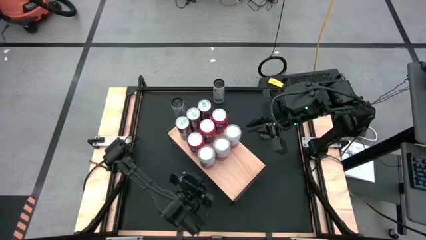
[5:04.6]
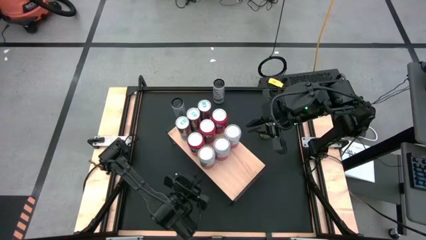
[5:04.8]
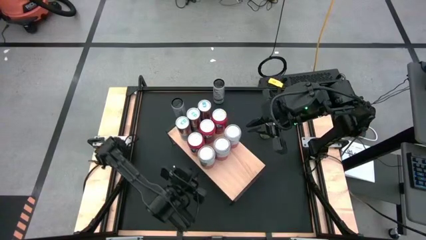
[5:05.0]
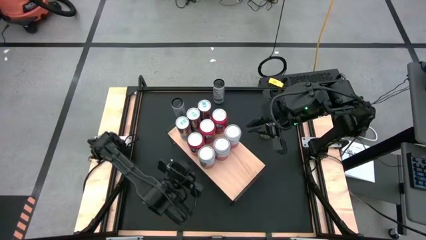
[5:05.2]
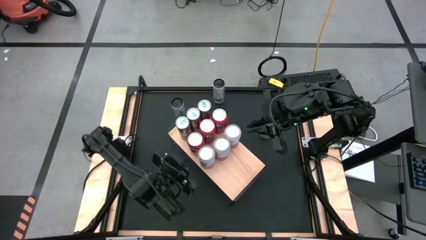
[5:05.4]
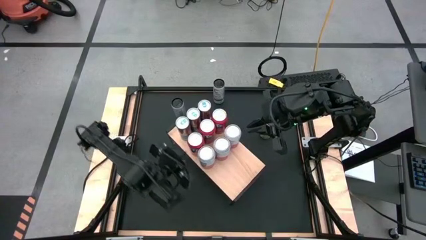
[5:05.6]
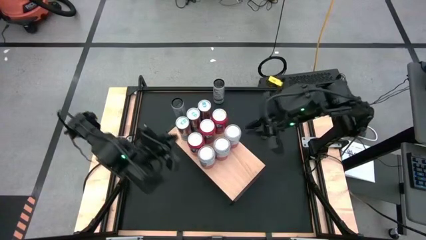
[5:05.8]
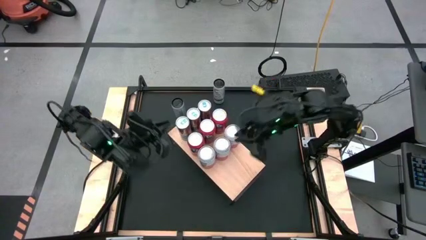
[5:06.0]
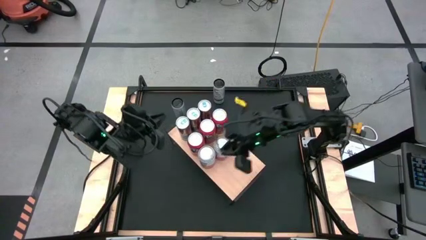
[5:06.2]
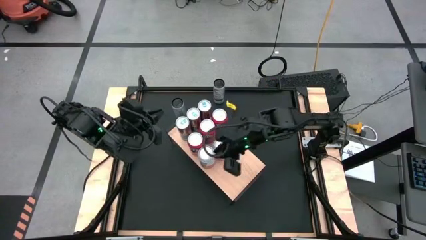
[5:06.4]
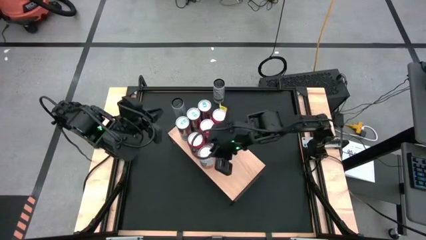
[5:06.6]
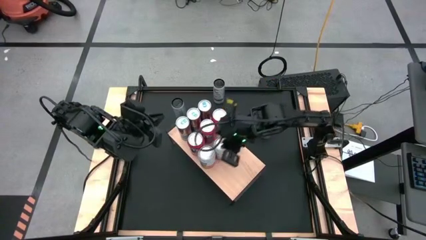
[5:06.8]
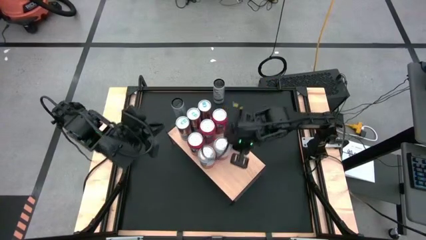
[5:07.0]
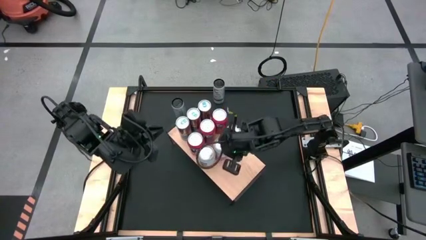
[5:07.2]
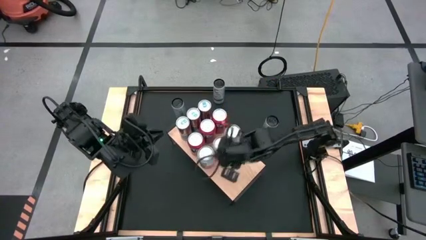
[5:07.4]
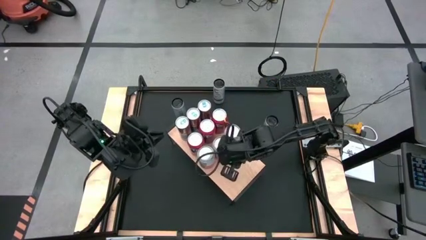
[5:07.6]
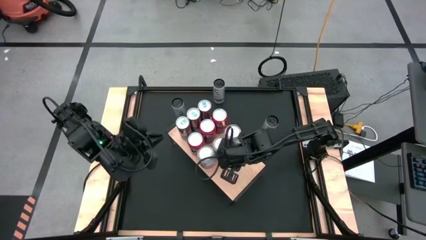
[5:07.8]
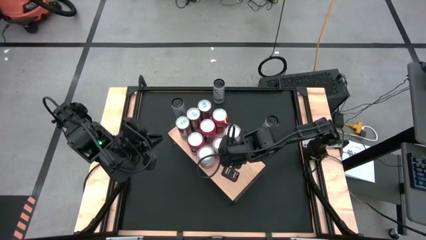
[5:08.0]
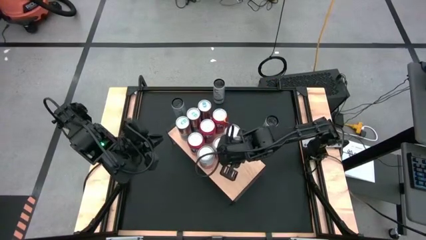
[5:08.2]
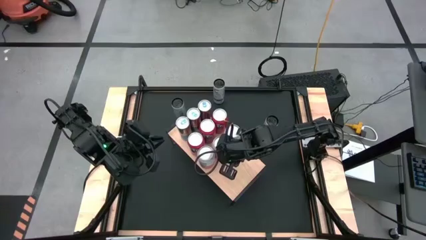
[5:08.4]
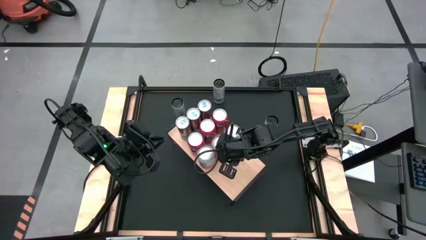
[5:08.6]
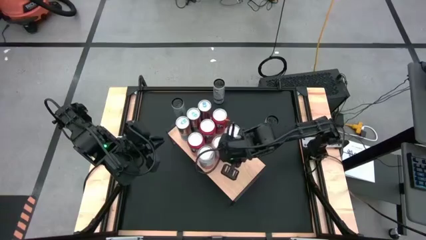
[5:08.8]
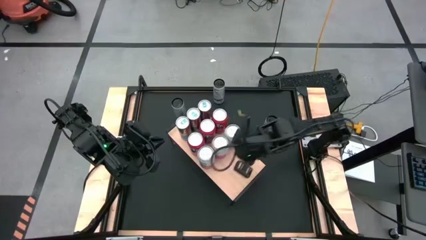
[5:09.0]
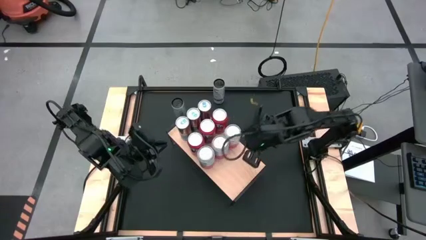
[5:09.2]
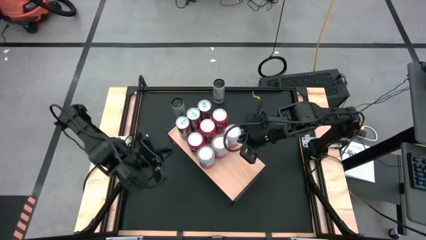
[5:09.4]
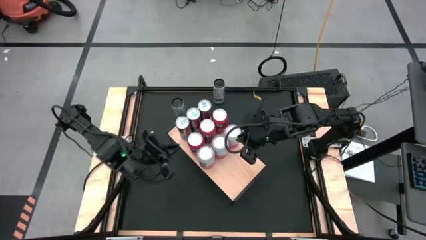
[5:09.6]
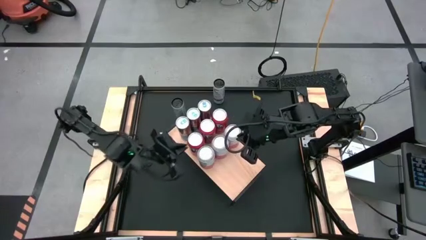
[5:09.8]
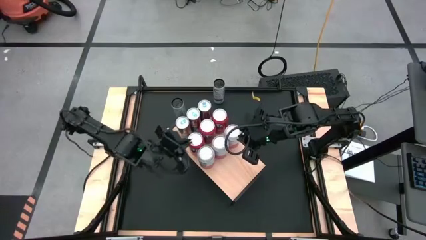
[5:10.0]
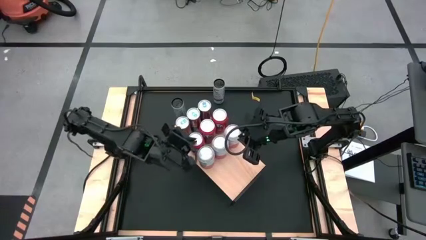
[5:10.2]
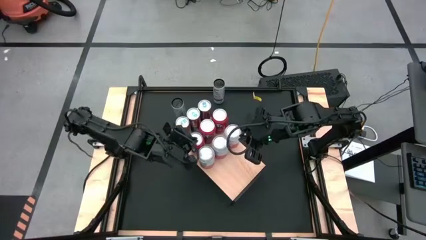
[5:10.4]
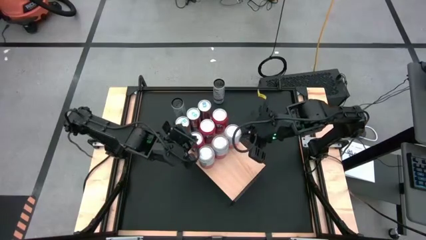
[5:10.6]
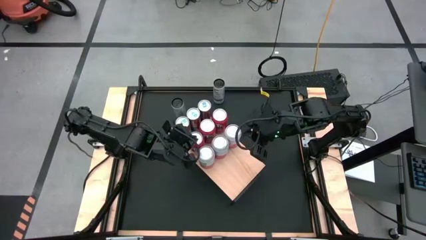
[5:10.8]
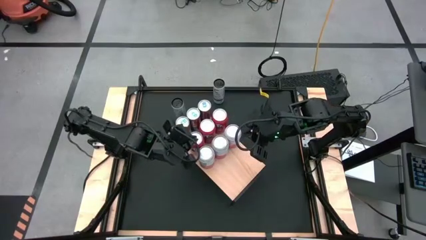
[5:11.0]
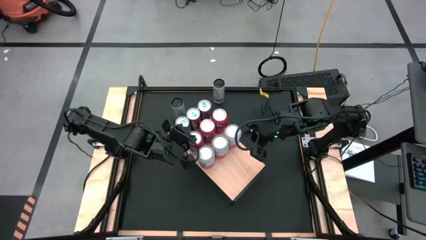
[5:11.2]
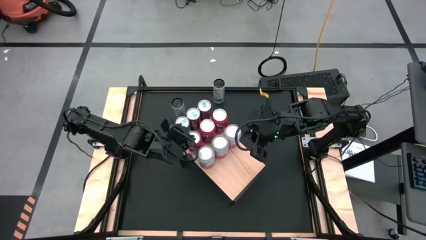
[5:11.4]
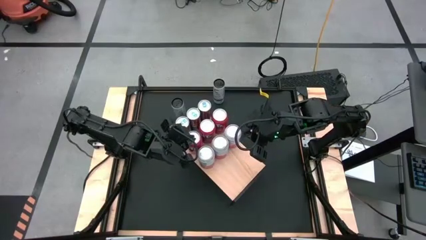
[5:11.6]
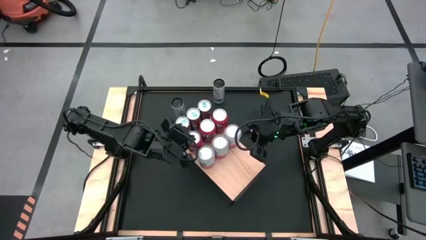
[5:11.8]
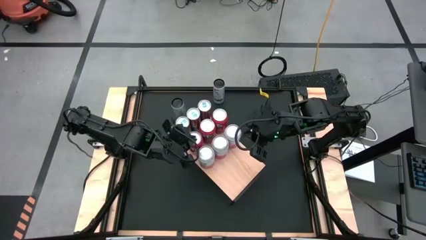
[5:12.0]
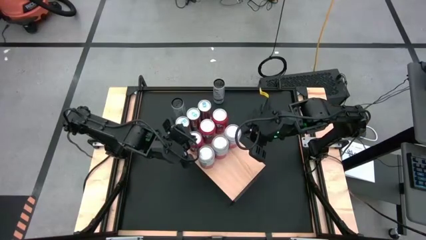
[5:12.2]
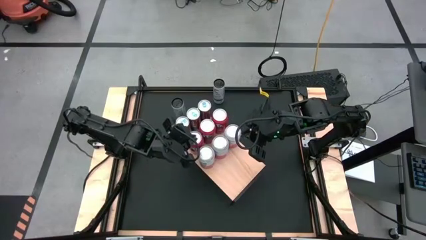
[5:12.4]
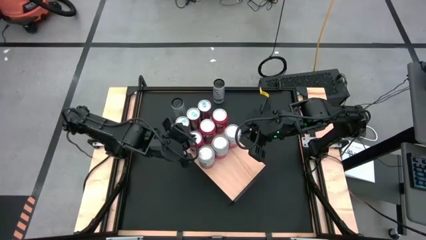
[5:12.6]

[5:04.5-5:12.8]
Task: Place canned beverage on shelf
Adjust the soda cans on the shelf

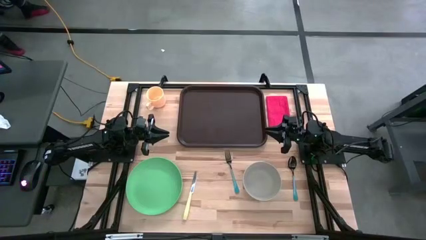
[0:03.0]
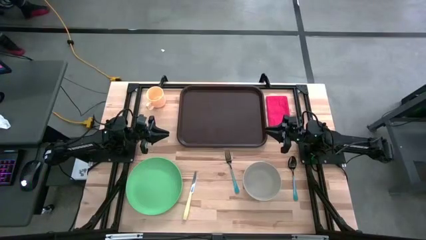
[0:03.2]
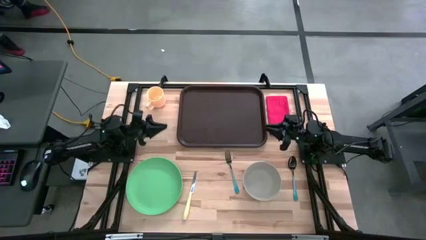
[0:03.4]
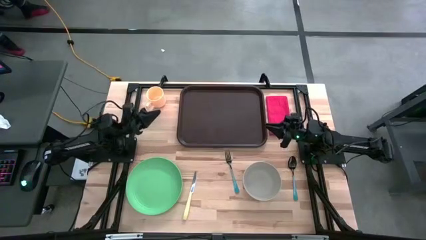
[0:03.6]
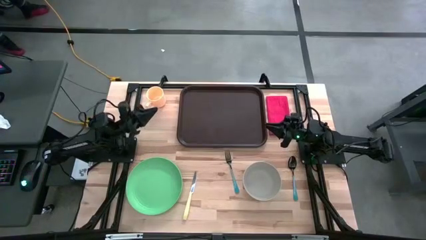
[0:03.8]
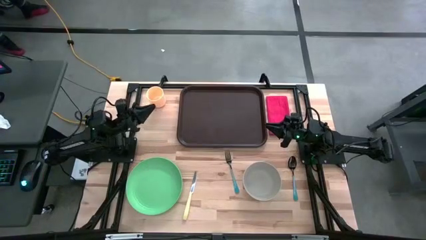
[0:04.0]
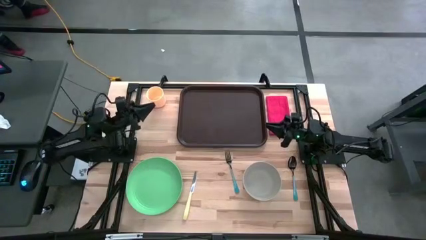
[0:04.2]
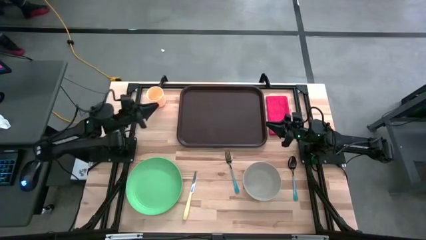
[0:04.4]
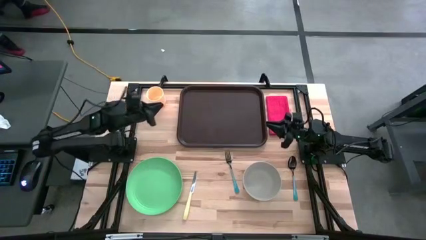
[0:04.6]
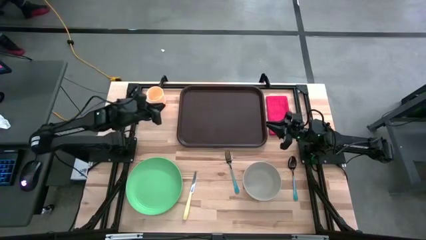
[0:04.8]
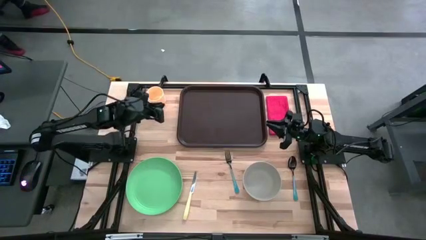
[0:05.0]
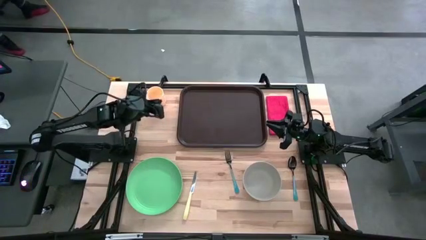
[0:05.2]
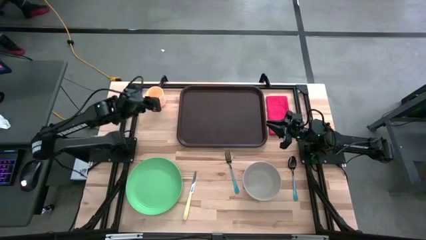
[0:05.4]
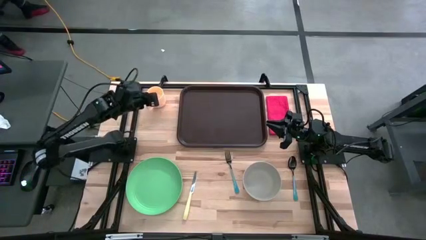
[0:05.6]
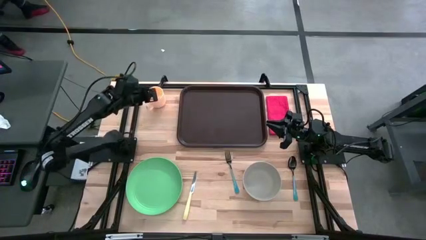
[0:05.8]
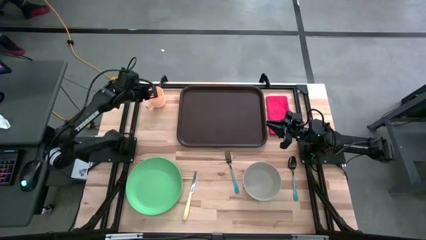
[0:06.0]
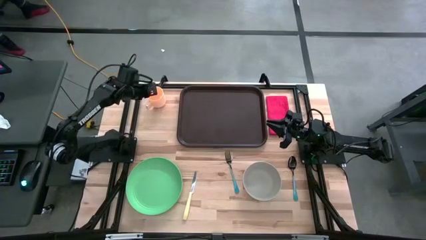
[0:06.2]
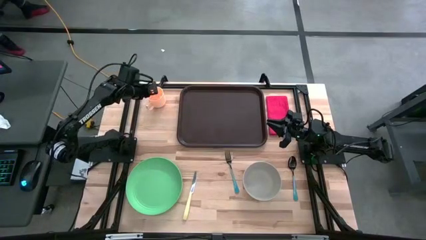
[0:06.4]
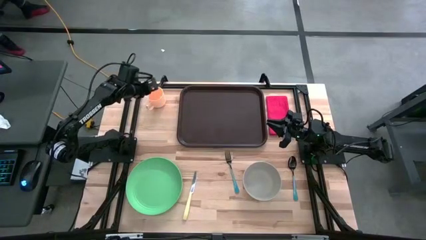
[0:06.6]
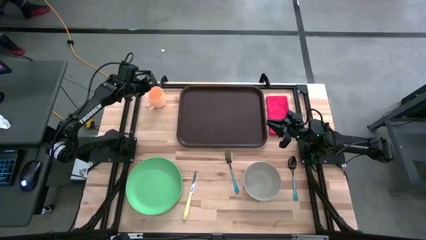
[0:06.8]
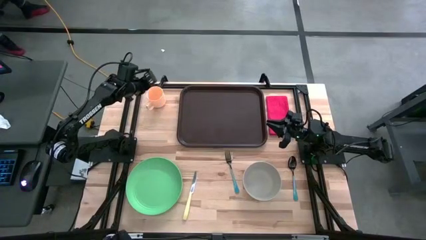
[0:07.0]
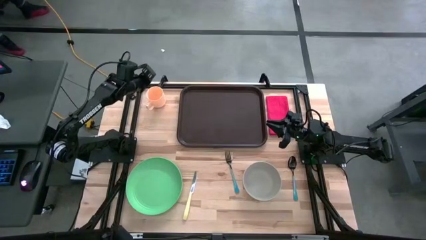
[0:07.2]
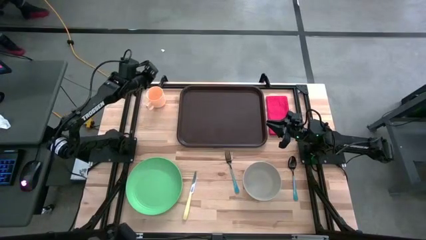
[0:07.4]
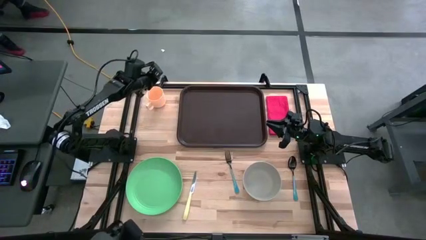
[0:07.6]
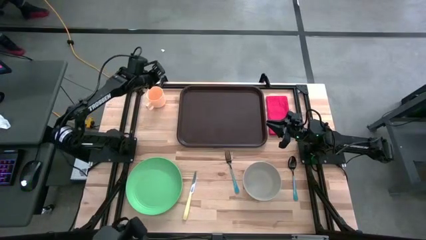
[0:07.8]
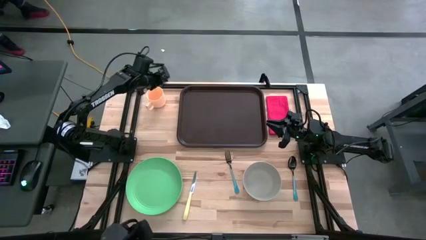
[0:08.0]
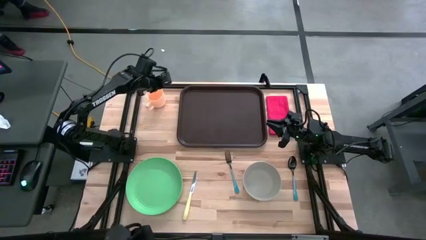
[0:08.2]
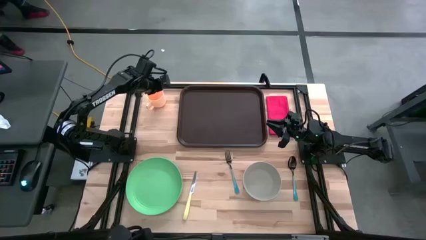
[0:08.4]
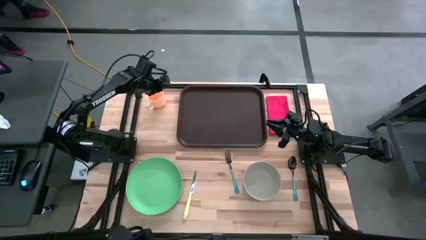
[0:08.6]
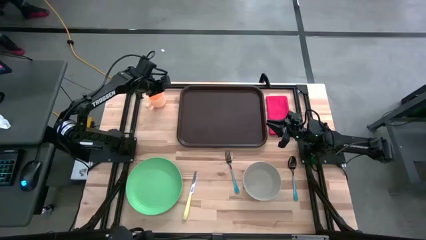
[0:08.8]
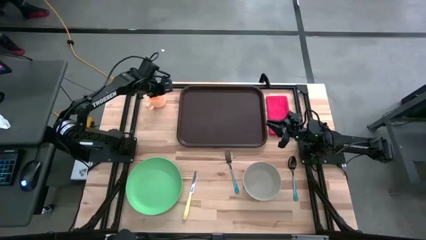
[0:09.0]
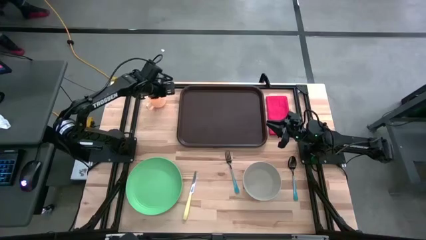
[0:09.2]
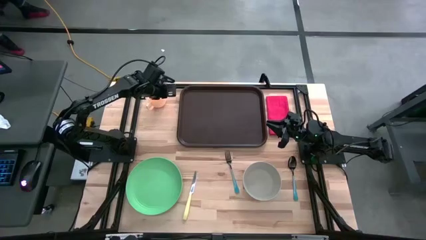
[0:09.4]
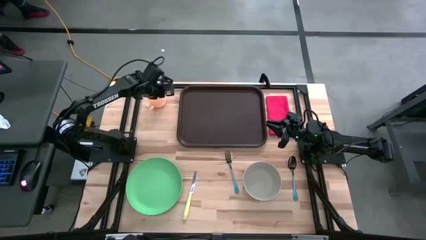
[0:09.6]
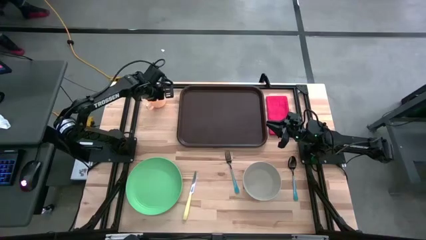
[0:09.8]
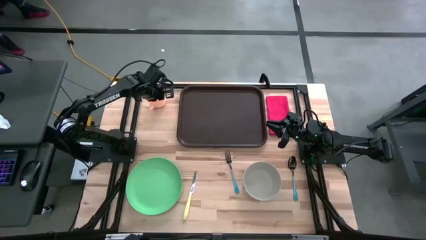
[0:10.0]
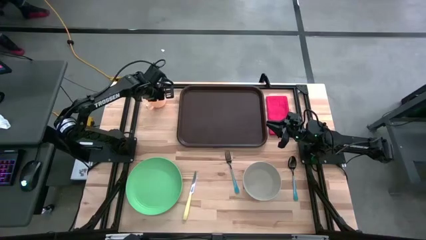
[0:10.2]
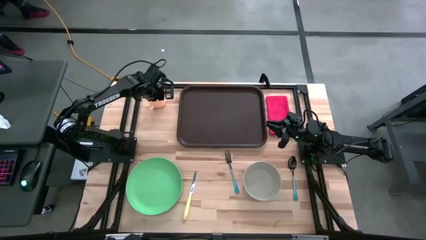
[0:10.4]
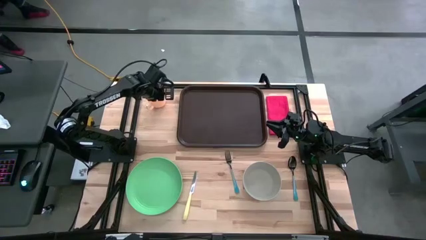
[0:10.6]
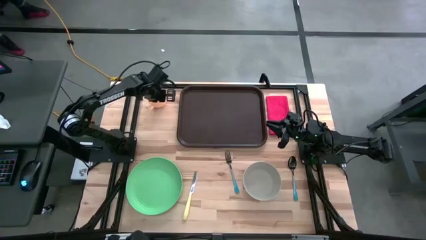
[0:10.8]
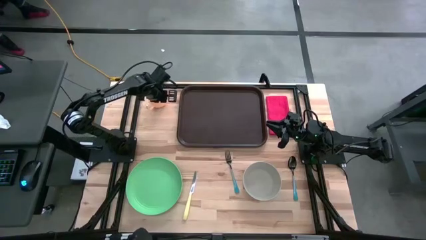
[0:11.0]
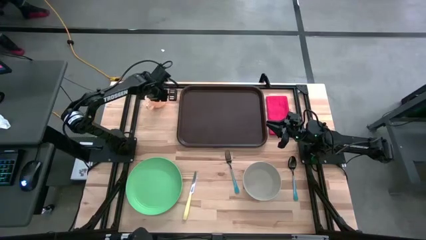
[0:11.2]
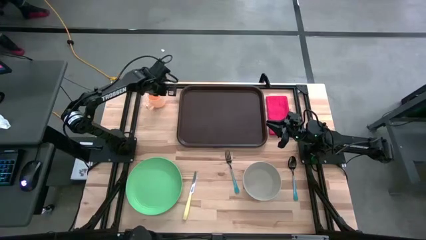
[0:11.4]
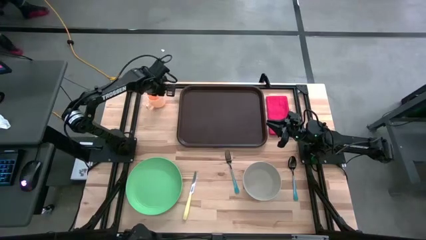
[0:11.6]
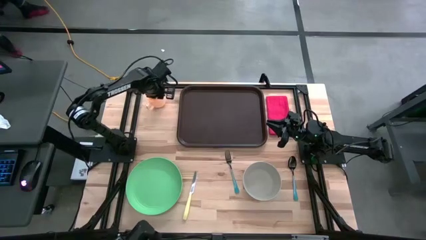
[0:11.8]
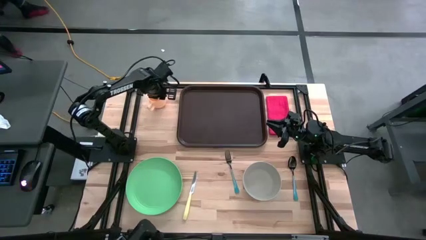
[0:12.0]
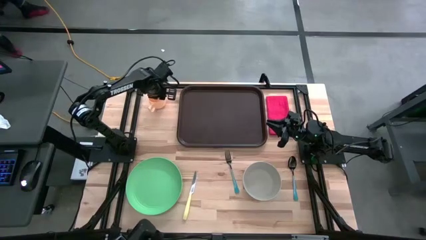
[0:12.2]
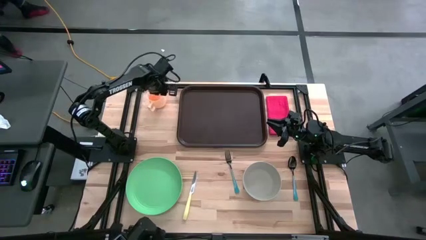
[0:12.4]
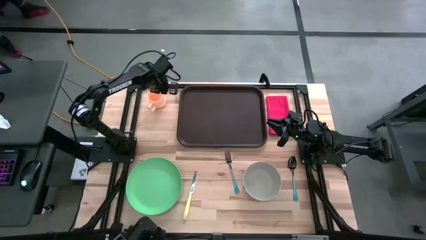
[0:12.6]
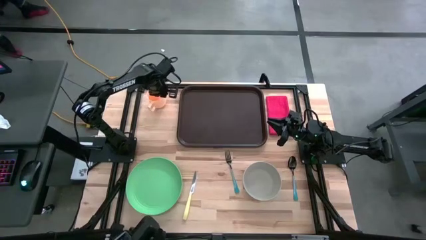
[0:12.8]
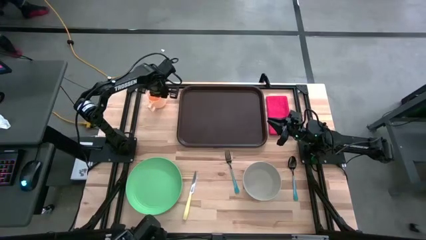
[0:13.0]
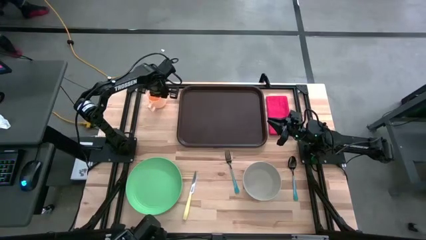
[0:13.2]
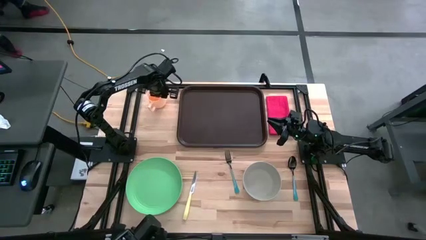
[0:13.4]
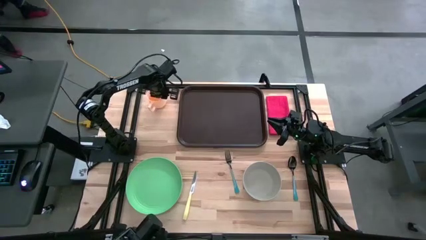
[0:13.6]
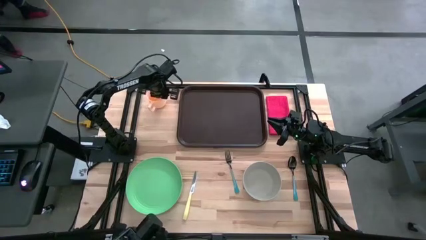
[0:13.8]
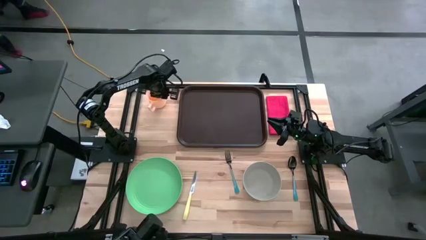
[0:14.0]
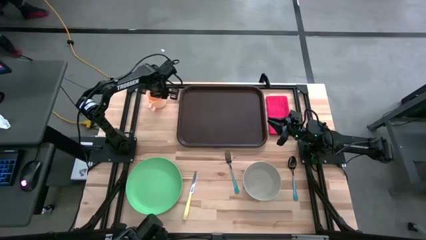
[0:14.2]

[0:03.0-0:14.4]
Task: Set up tray
Put the yellow mug on the brown serving tray
